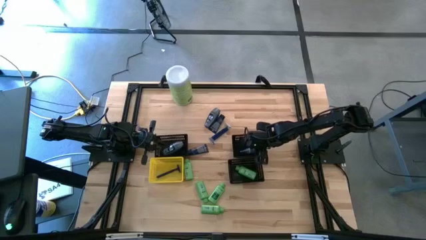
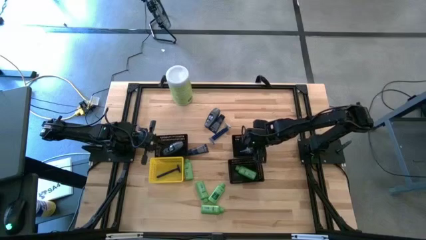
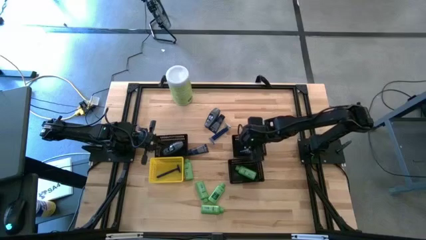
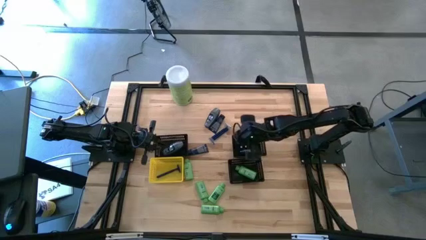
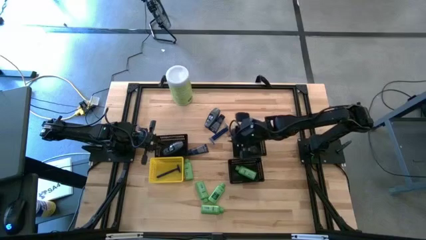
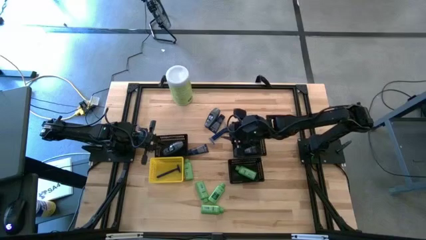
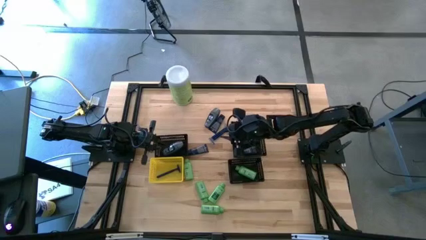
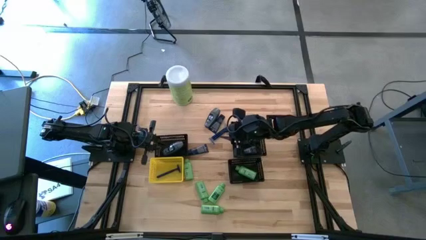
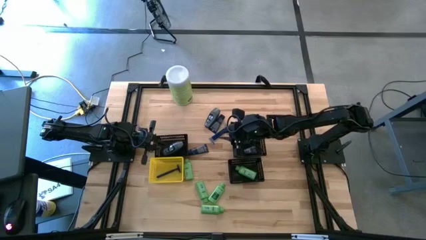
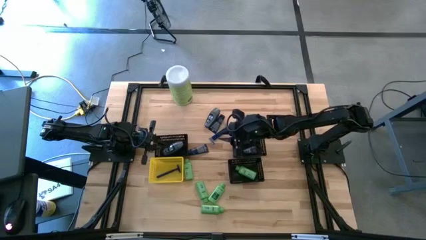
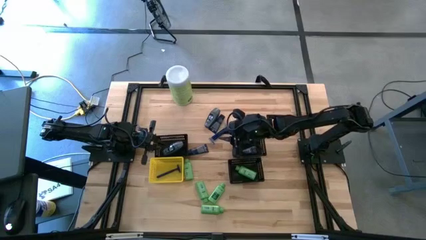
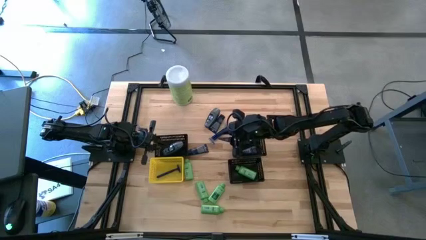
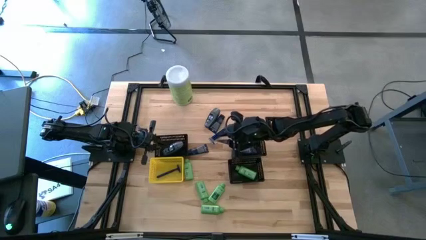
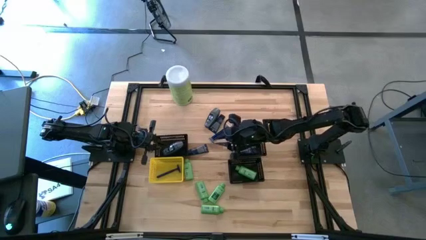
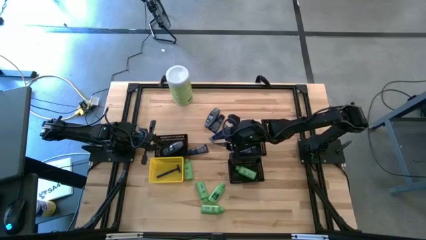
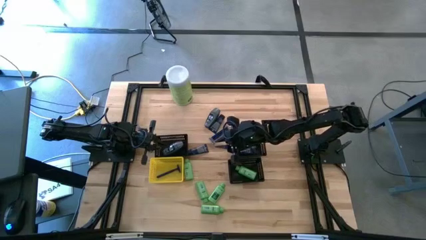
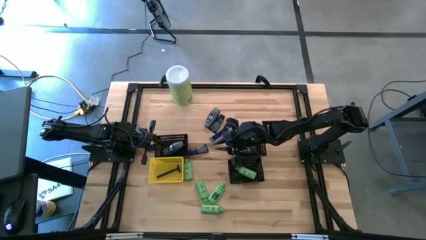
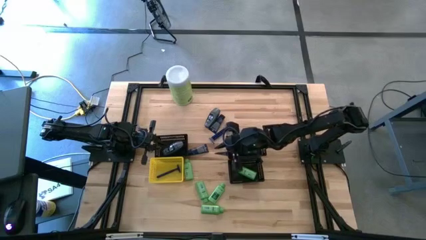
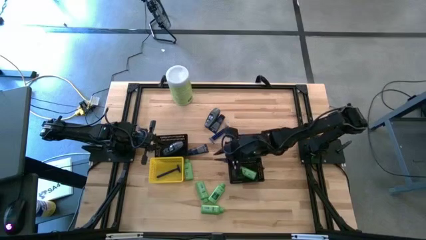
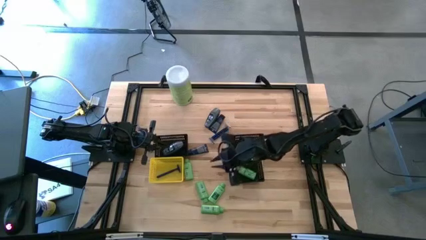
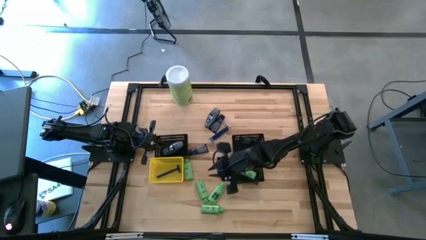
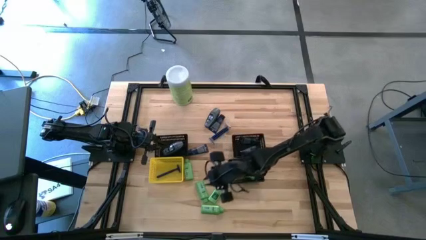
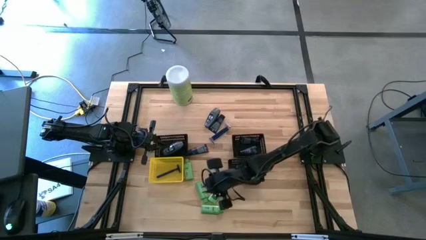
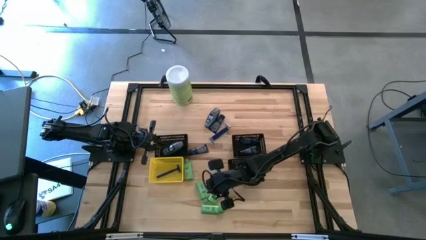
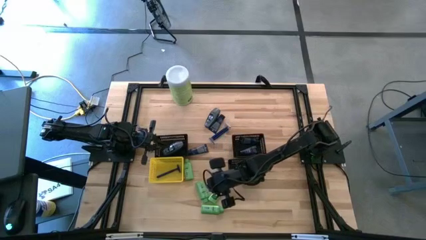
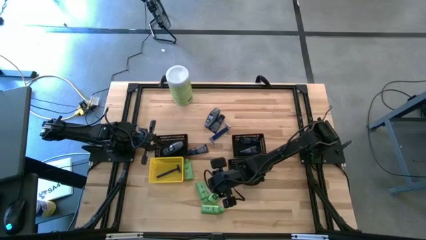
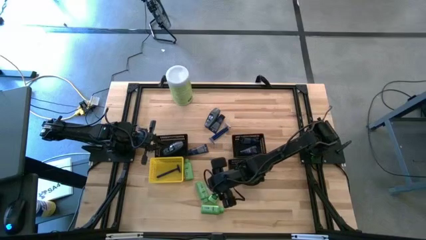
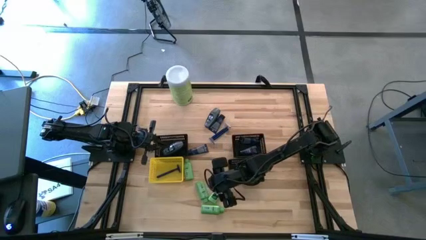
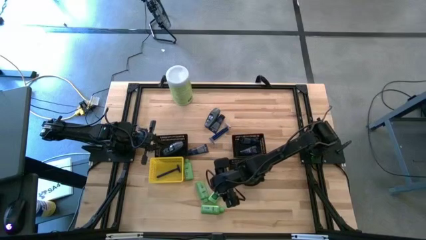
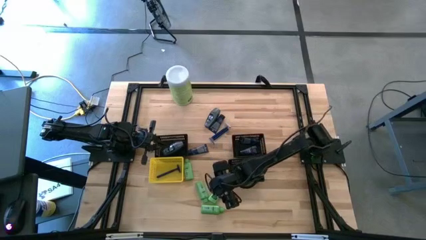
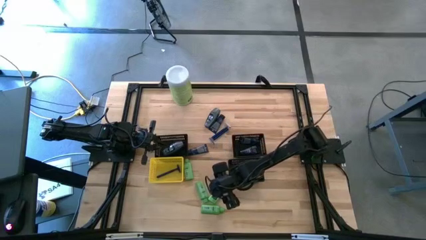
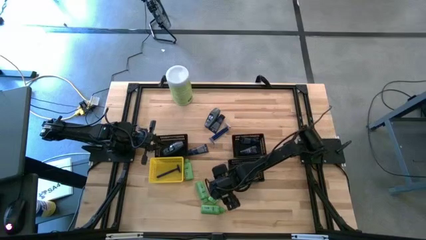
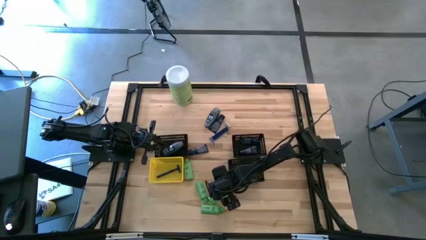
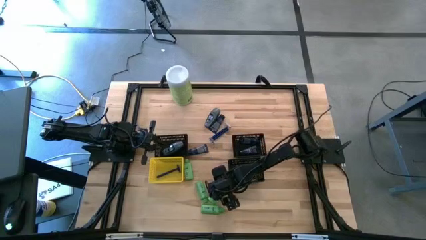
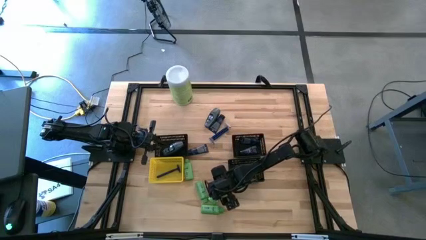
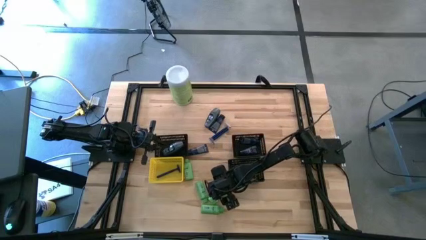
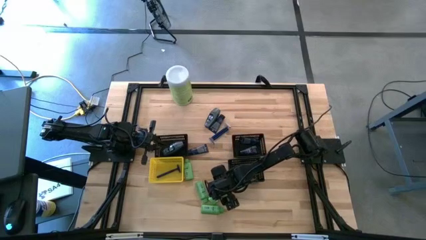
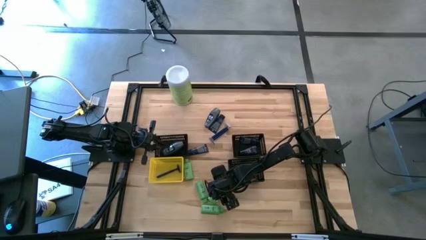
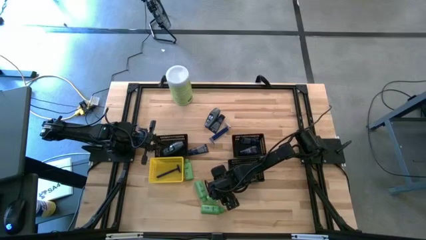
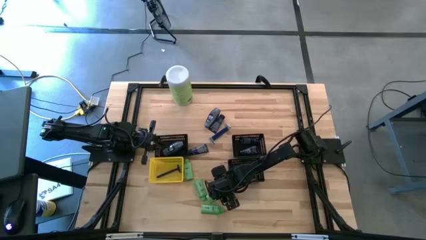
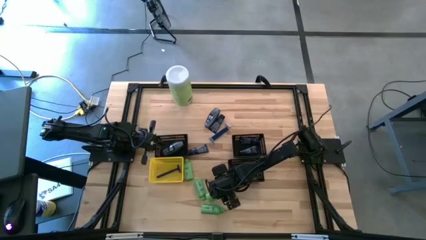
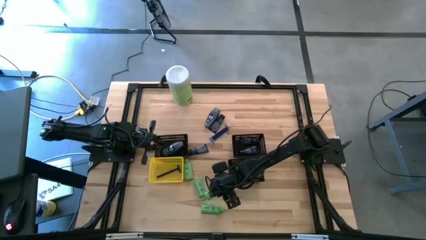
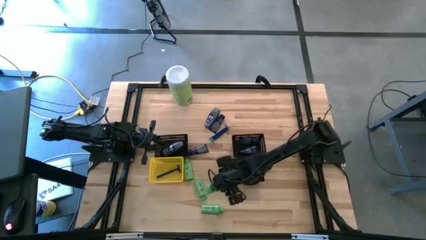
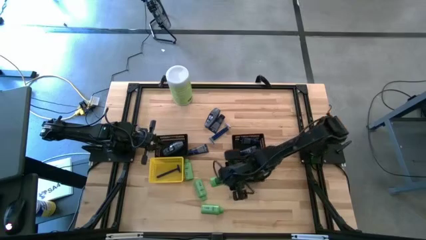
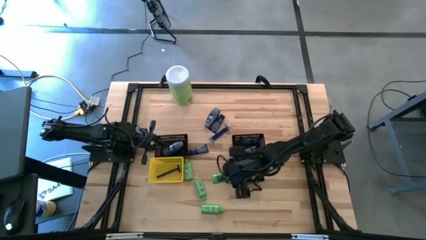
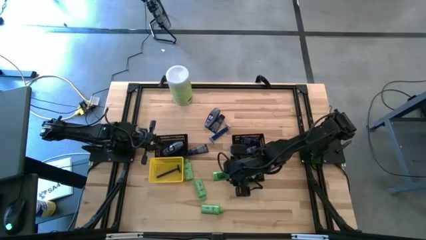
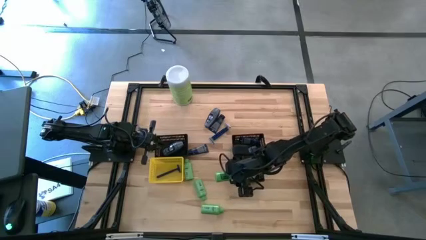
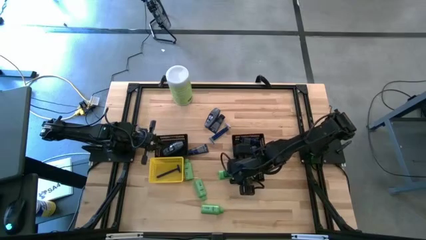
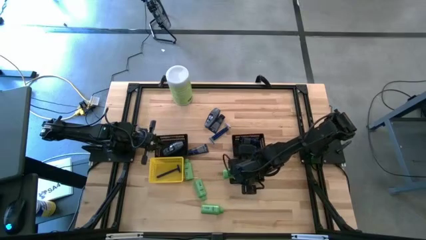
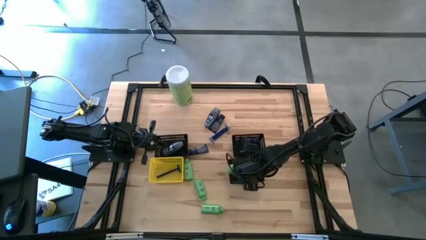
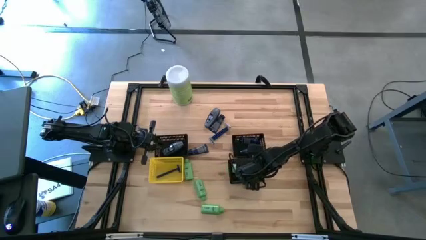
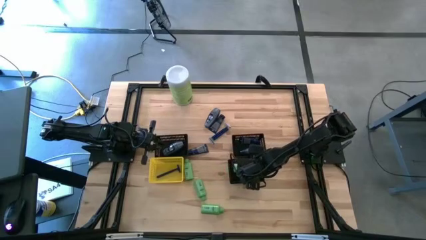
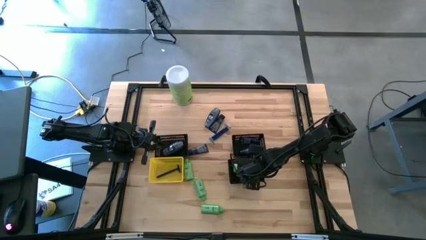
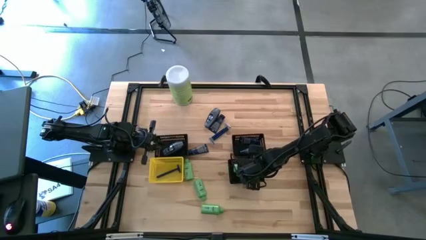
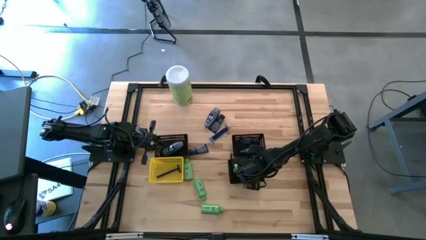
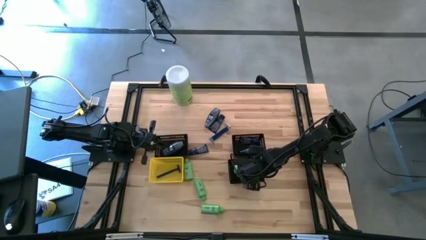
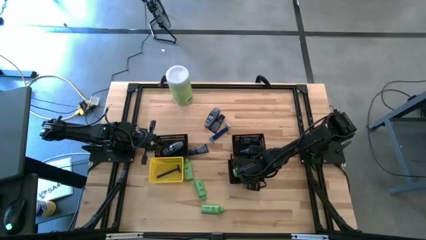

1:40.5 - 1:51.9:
Task: Pick & Place Travel size toiletries
Put the green shampoo into the bottom right black bin
